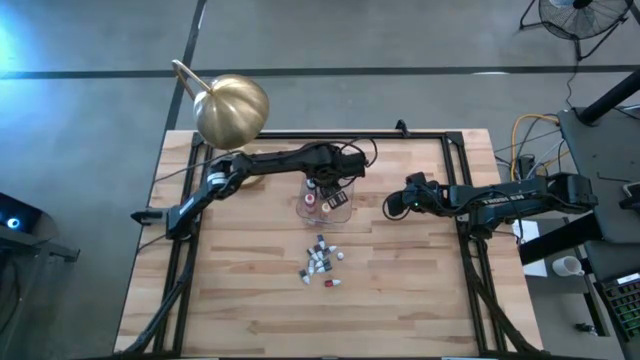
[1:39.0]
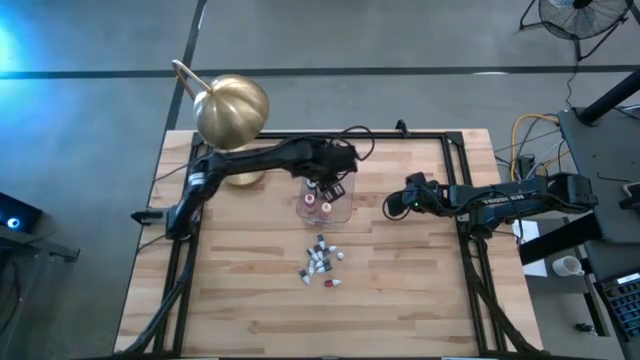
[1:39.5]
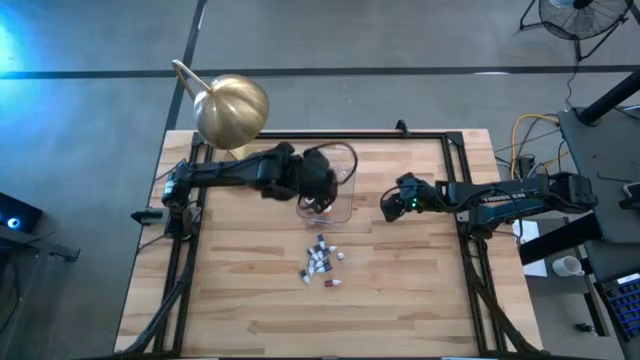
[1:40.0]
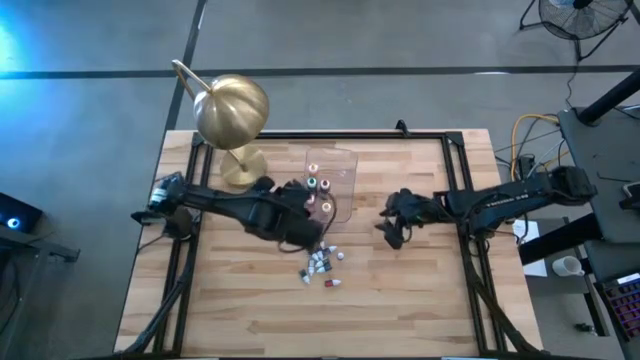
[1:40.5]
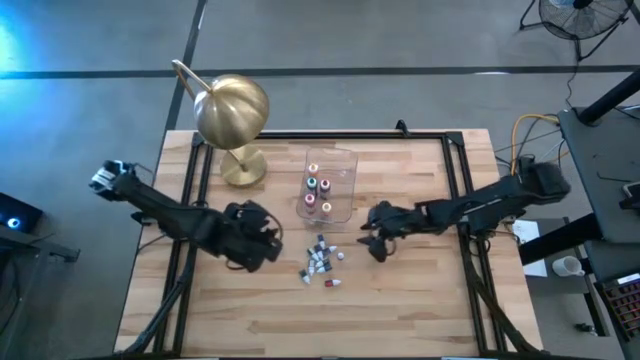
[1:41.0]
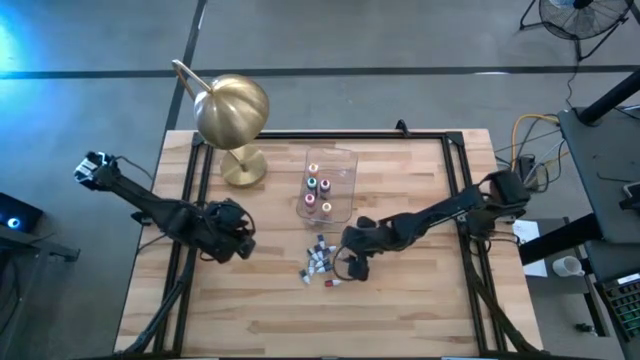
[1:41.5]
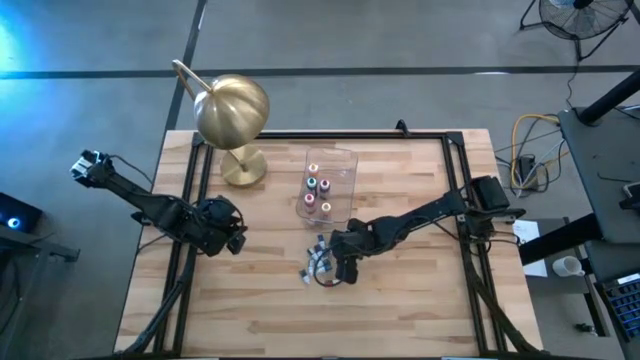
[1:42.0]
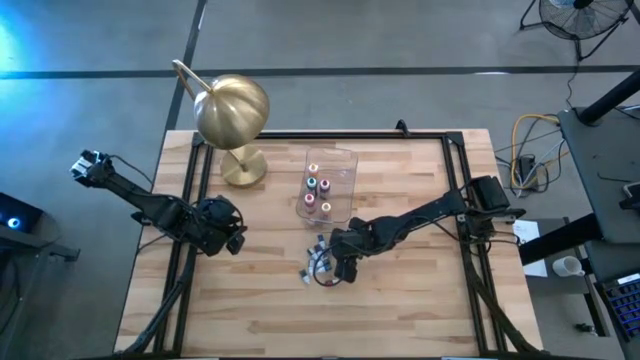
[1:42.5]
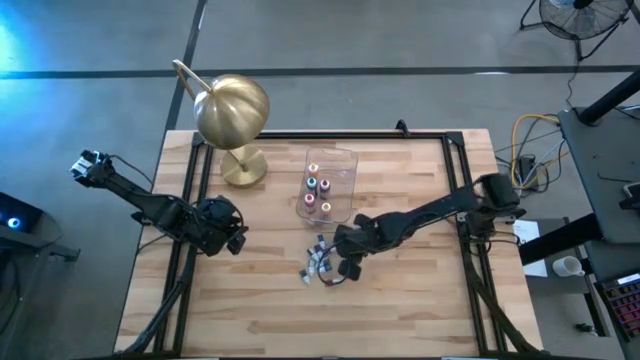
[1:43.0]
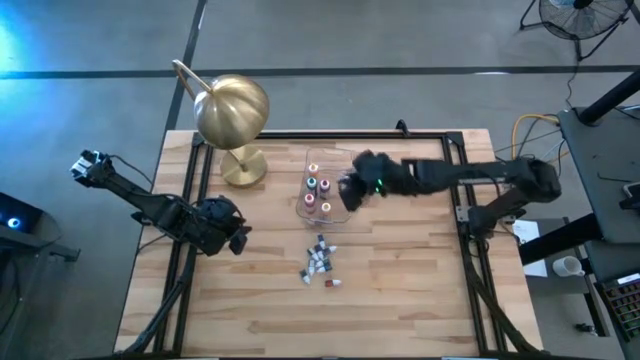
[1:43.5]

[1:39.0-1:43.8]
Task: Pick & Place food coloring
Put the small orange food coloring bottle into the transparent bin

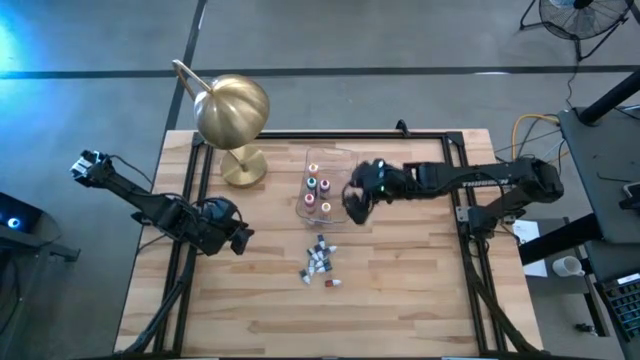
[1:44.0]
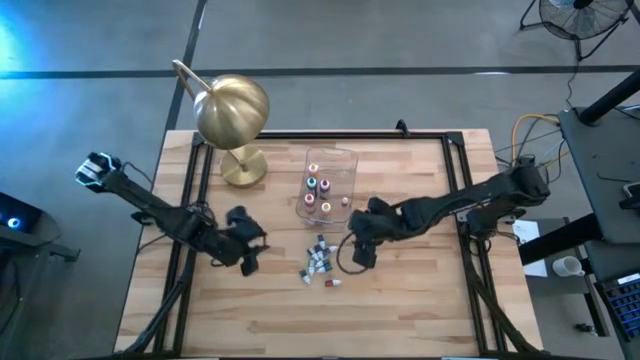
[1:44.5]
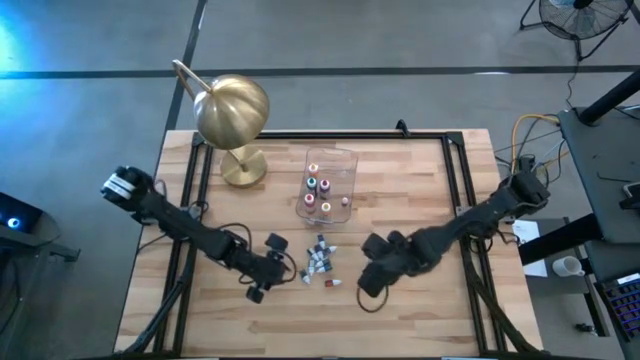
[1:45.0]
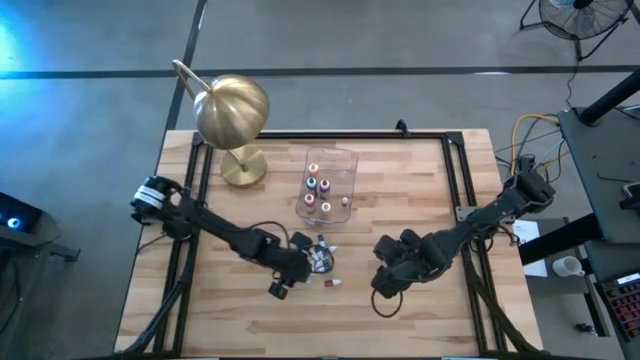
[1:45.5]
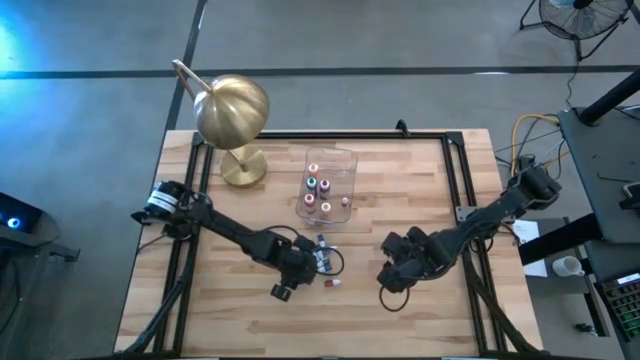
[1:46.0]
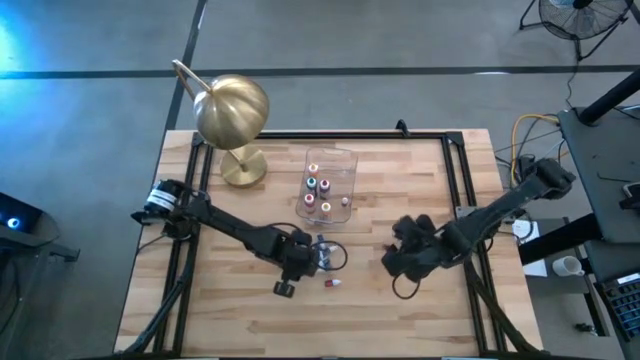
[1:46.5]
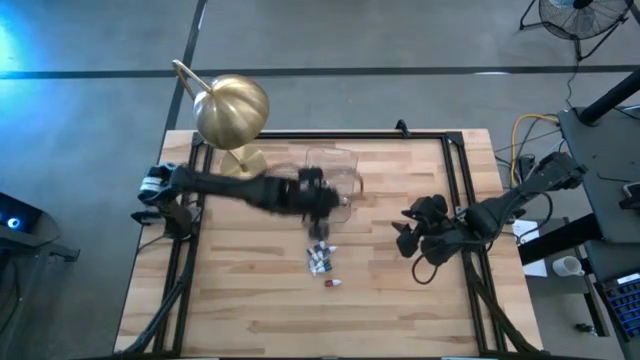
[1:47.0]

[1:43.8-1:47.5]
Put the left small green food coloring bottle into the transparent bin

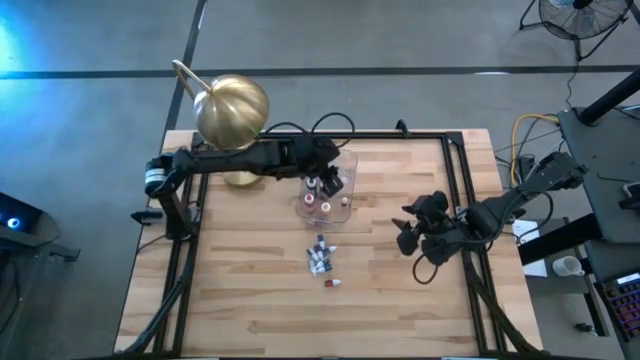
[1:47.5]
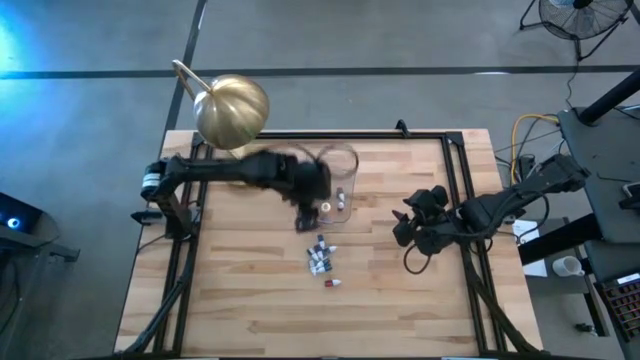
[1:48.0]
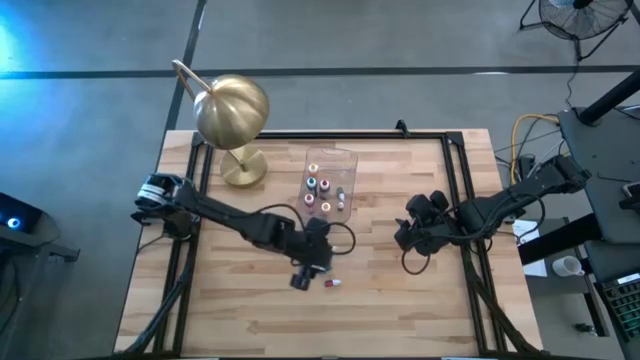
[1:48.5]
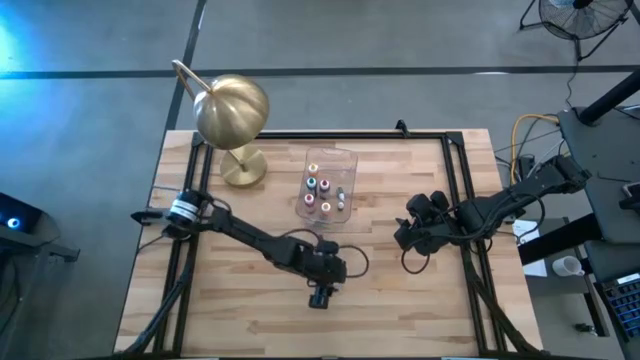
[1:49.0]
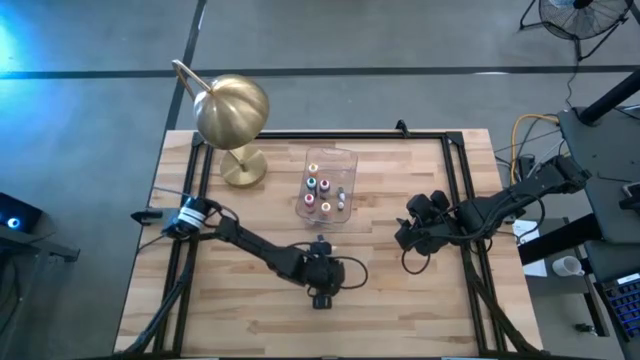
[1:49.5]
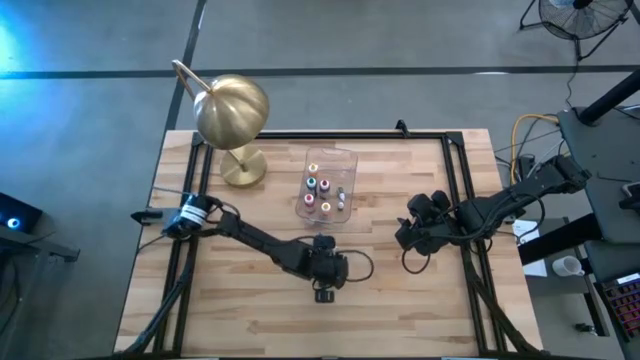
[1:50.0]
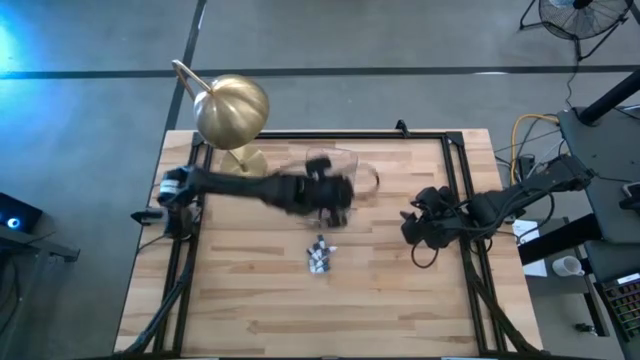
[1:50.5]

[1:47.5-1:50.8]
Put the bottom small red food coloring bottle into the transparent bin

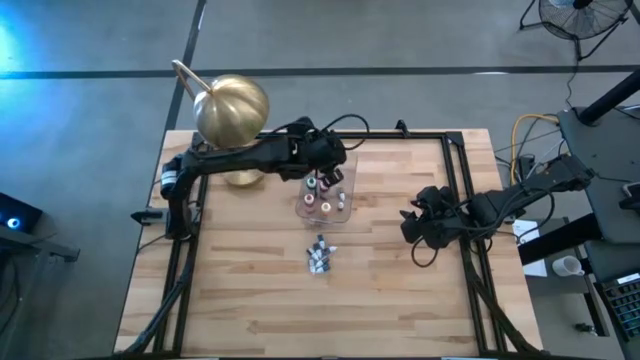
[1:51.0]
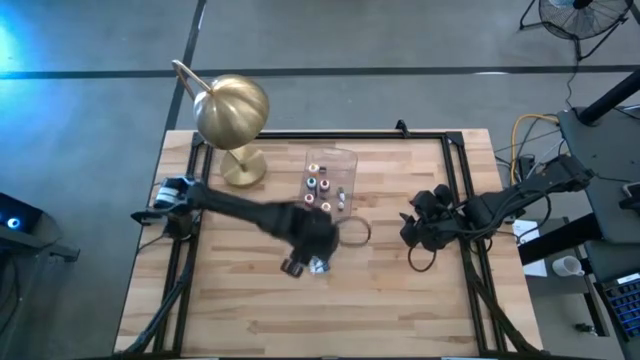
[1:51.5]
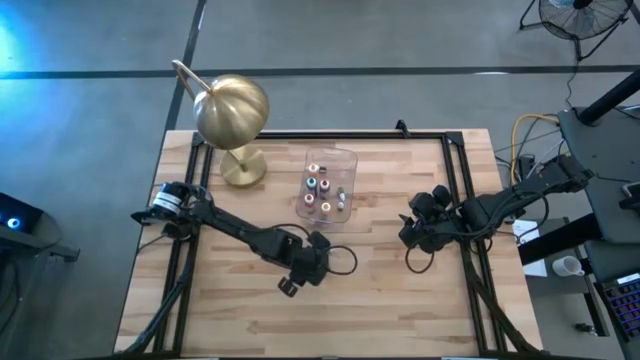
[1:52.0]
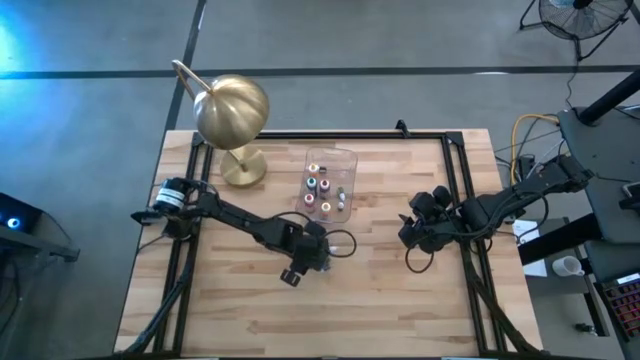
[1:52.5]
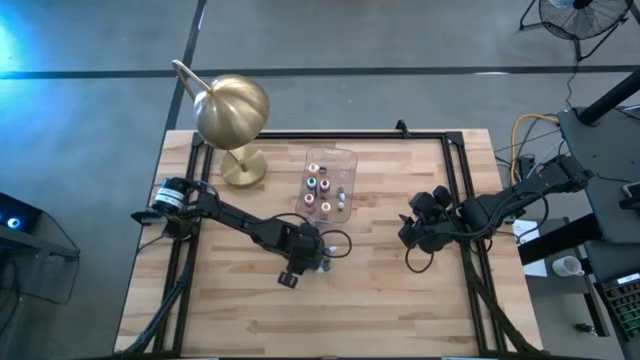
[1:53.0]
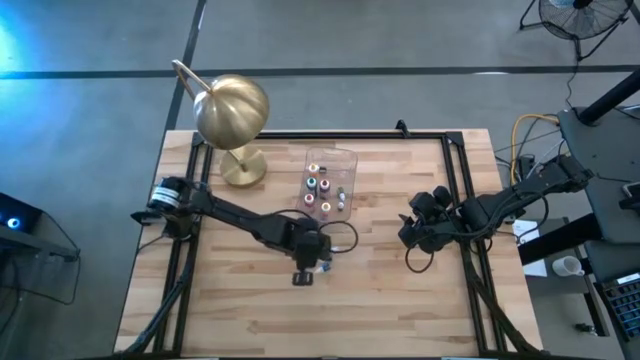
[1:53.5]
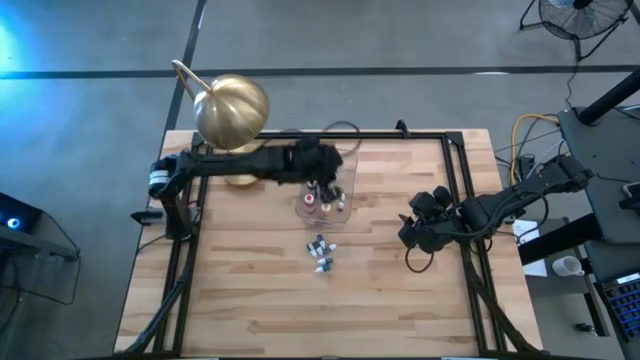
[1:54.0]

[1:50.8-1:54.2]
Put the small green food coloring bottle into the transparent bin

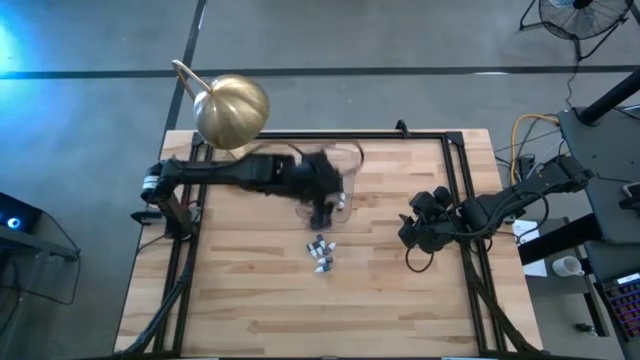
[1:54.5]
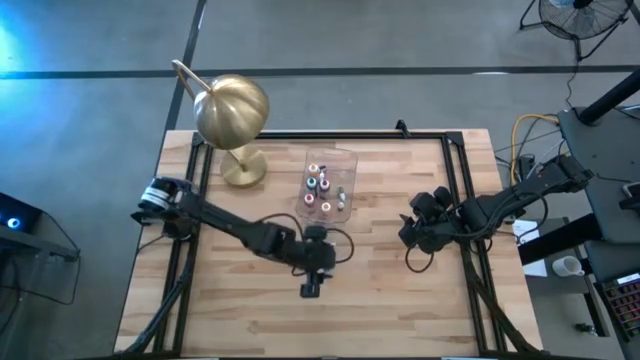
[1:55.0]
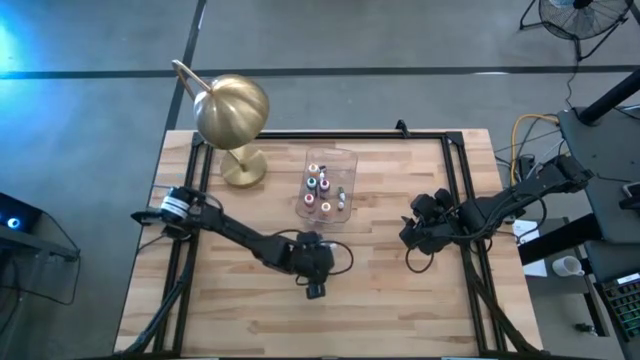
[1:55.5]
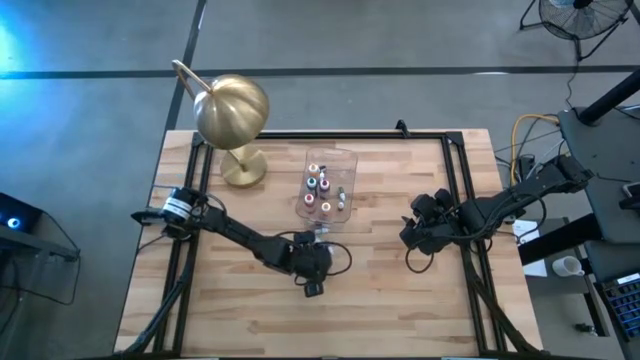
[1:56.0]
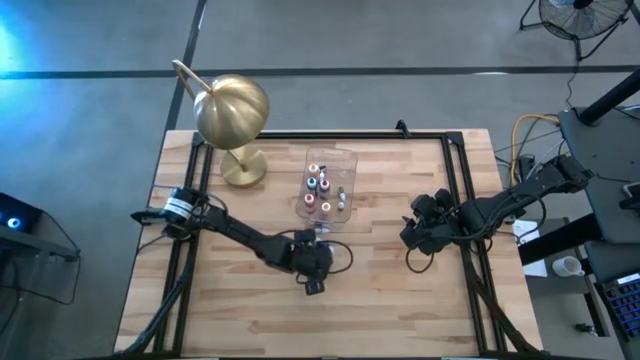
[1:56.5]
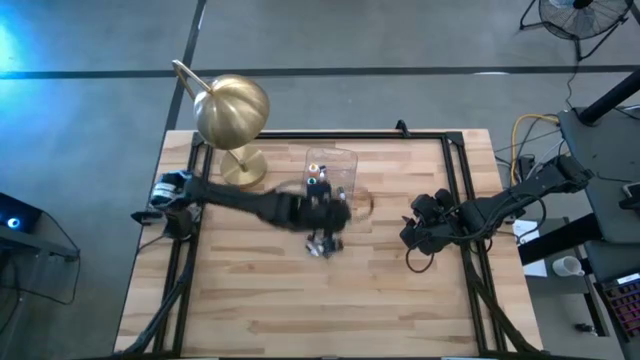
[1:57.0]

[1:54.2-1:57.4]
Put the bottom small blue food coloring bottle into the transparent bin

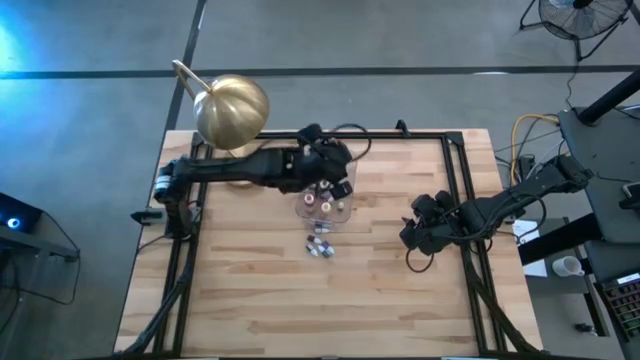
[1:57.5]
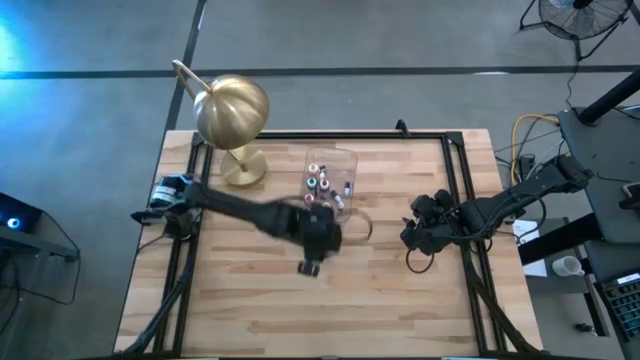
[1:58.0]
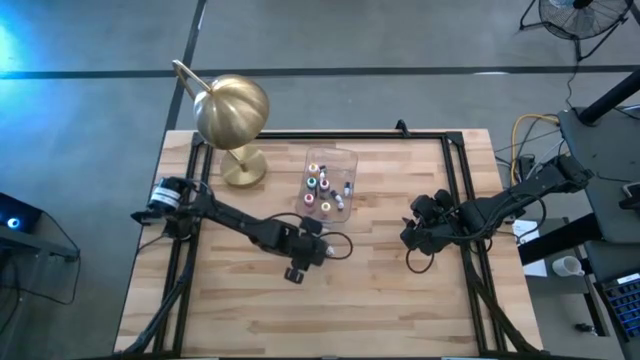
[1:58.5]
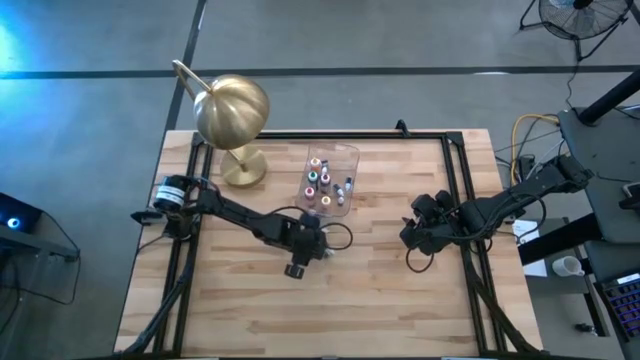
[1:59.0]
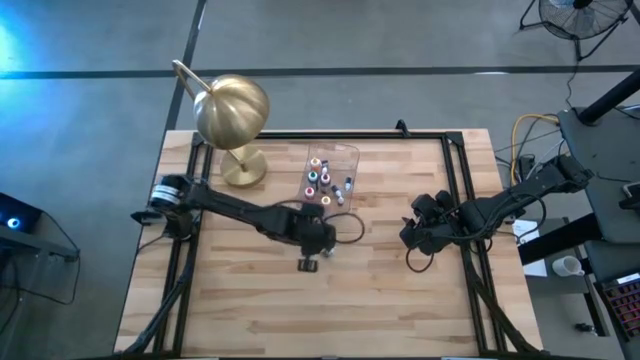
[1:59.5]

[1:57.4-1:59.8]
Put the small black food coloring bottle into the transparent bin

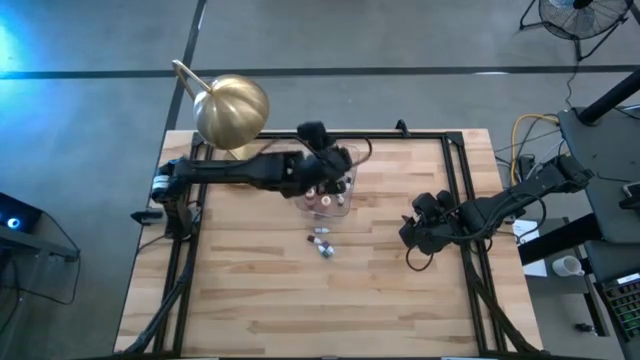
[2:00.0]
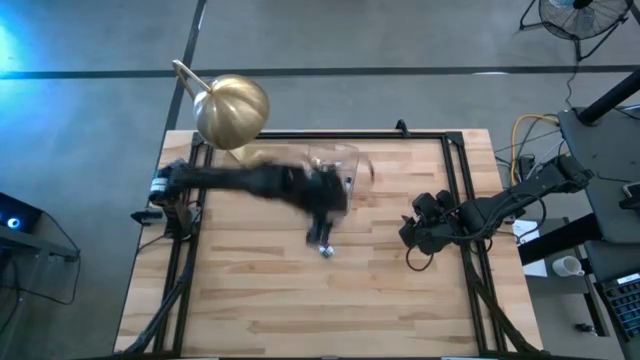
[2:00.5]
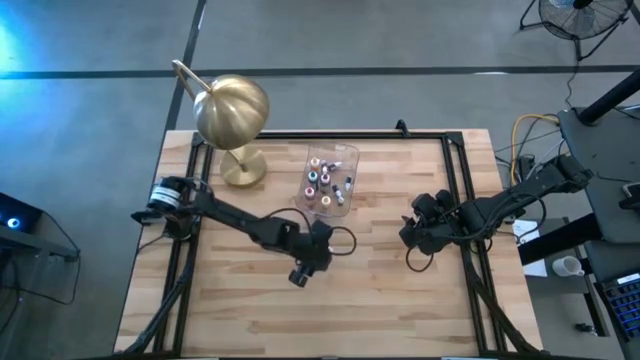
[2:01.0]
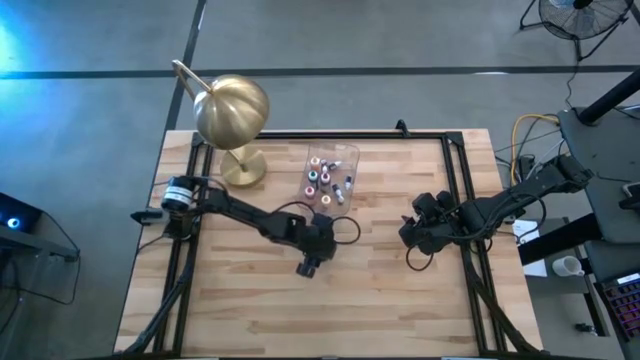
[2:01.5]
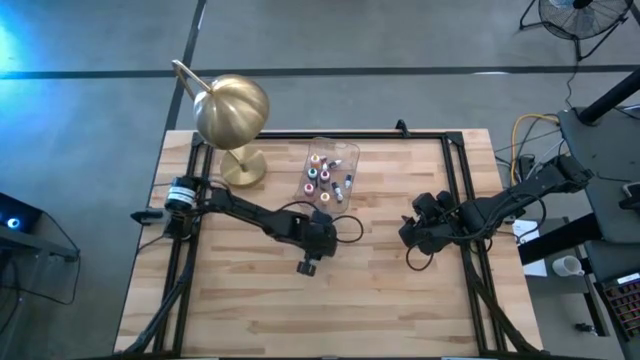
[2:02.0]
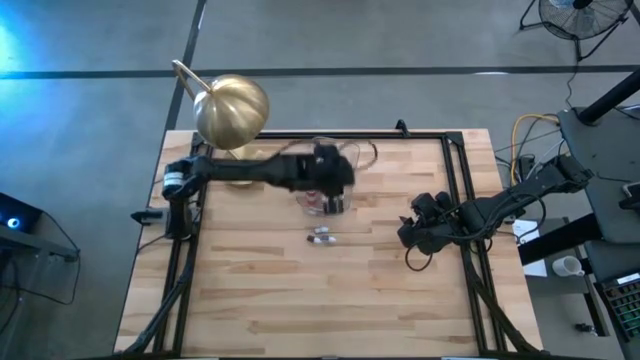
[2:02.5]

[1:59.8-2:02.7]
Put the small dark green food coloring bottle into the transparent bin
